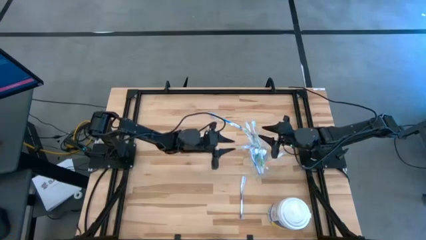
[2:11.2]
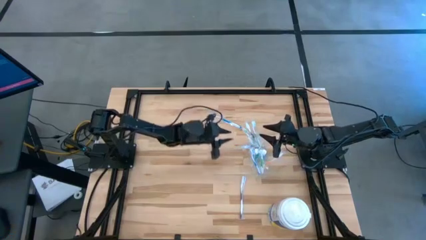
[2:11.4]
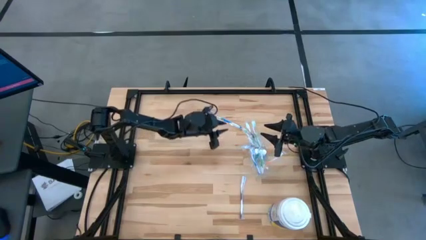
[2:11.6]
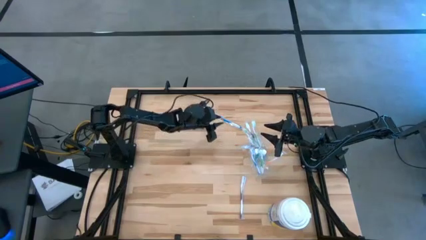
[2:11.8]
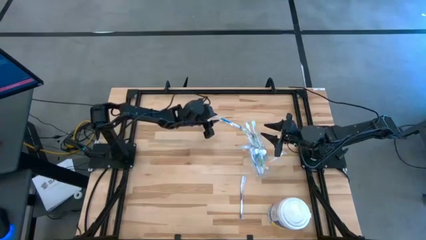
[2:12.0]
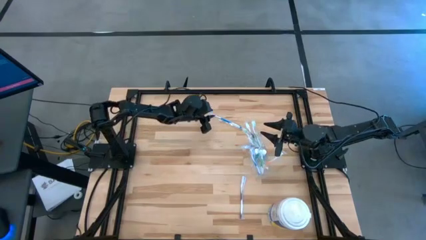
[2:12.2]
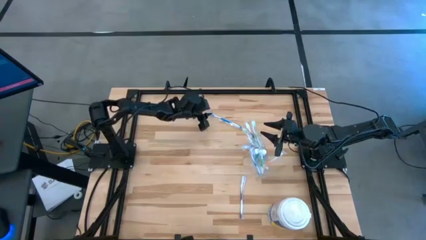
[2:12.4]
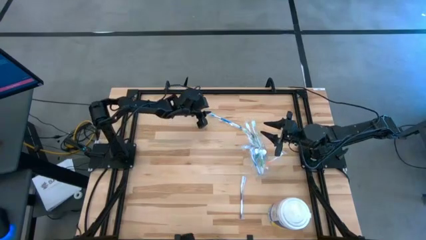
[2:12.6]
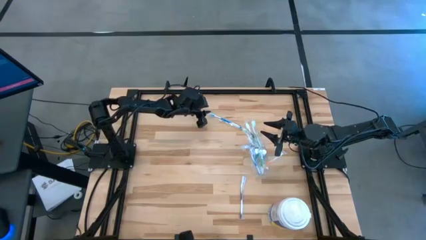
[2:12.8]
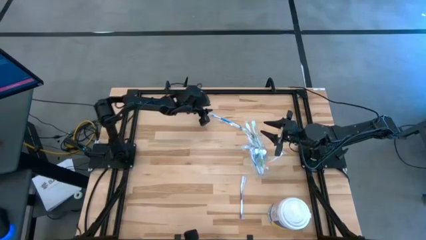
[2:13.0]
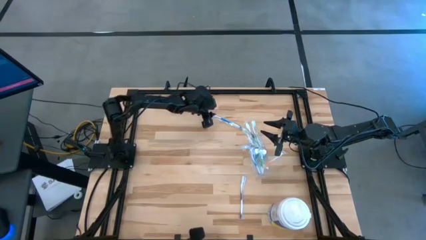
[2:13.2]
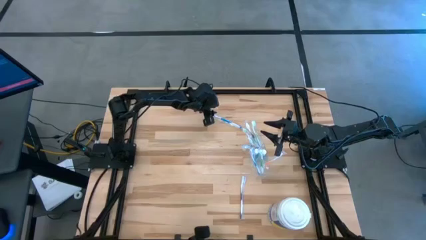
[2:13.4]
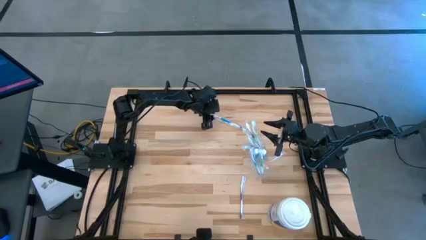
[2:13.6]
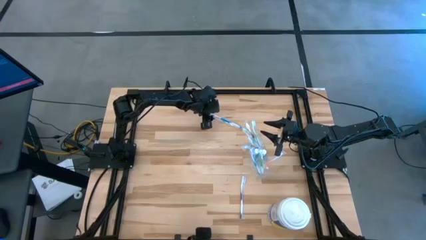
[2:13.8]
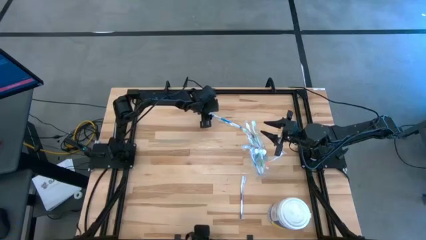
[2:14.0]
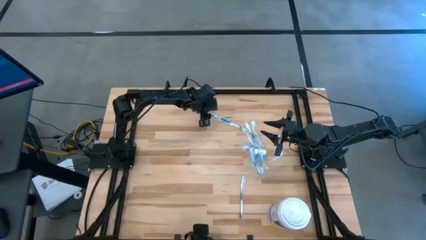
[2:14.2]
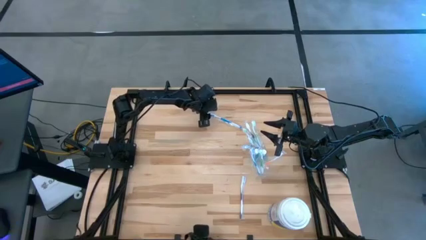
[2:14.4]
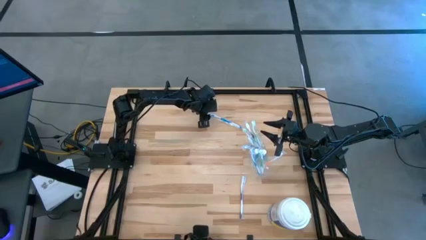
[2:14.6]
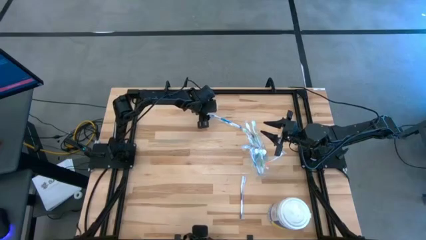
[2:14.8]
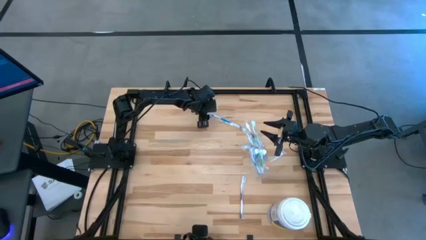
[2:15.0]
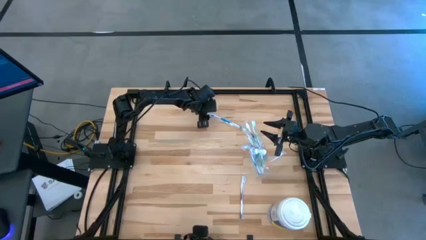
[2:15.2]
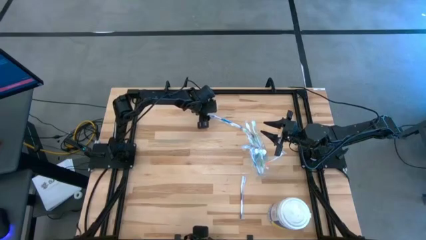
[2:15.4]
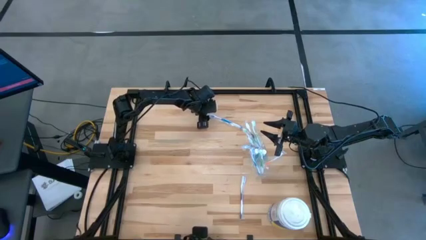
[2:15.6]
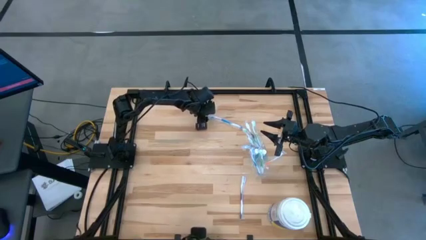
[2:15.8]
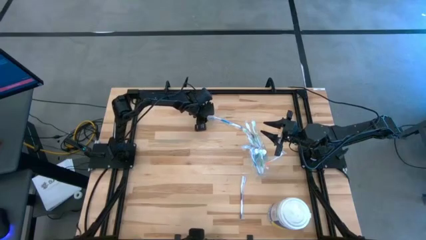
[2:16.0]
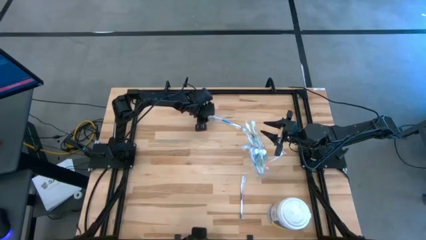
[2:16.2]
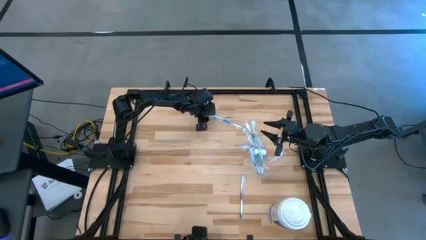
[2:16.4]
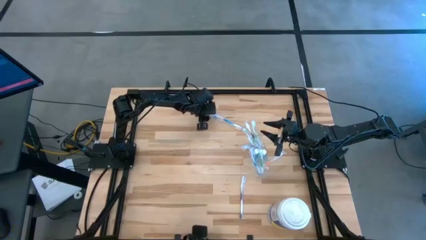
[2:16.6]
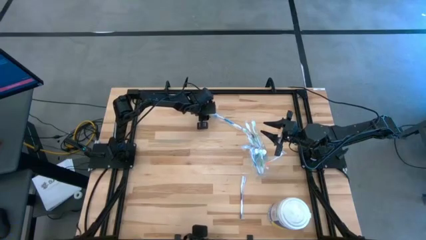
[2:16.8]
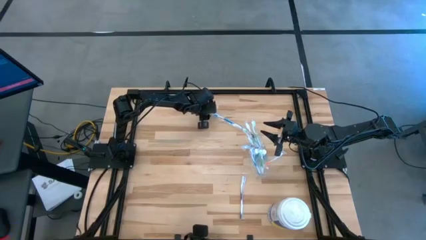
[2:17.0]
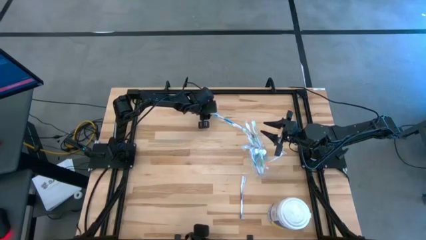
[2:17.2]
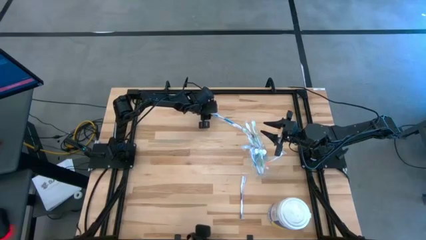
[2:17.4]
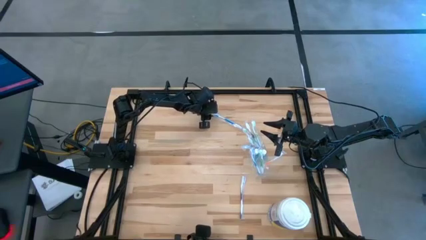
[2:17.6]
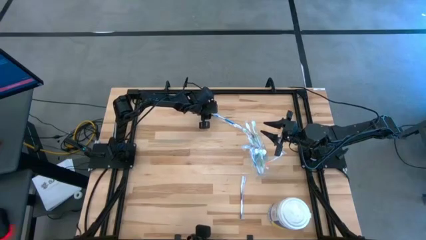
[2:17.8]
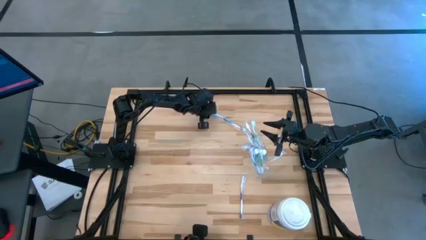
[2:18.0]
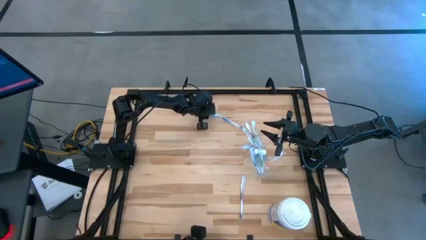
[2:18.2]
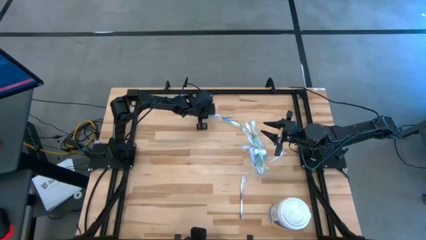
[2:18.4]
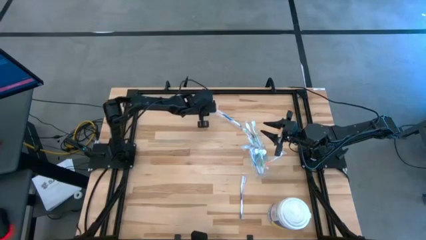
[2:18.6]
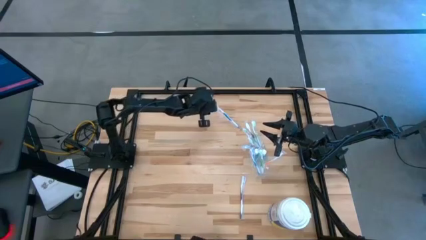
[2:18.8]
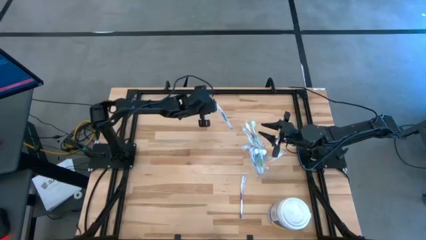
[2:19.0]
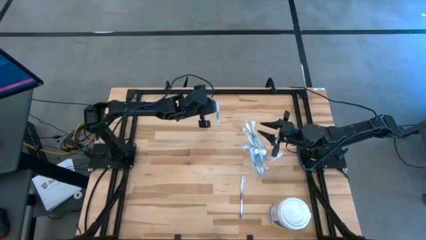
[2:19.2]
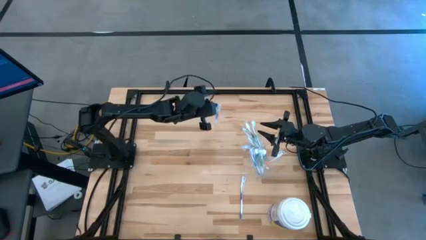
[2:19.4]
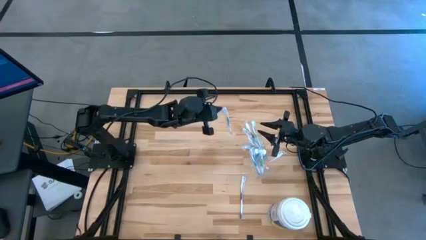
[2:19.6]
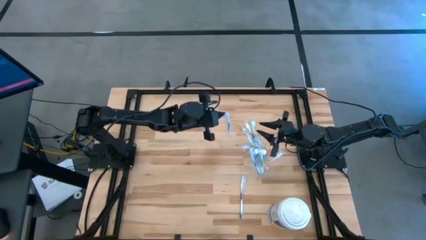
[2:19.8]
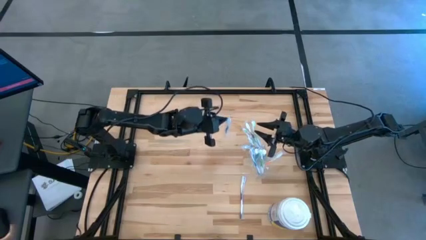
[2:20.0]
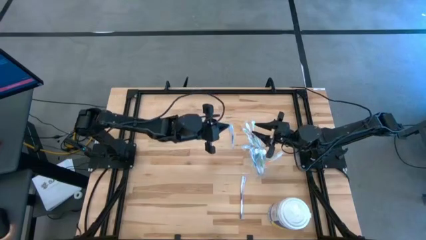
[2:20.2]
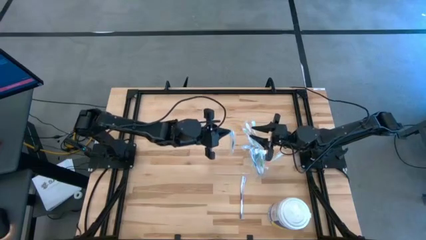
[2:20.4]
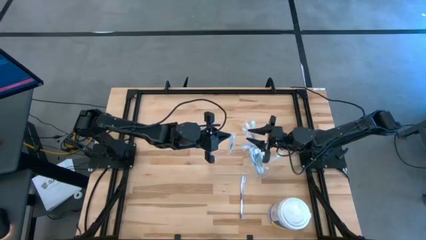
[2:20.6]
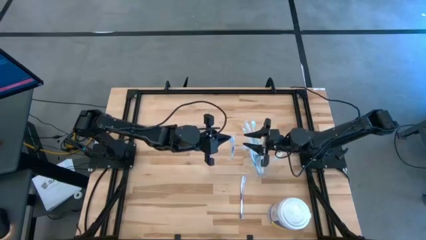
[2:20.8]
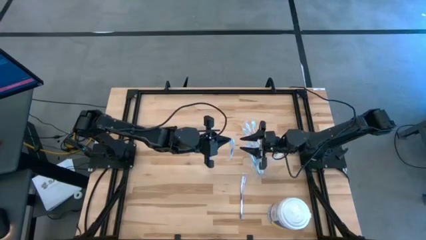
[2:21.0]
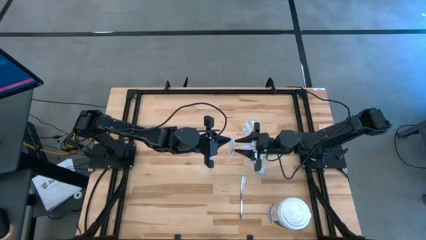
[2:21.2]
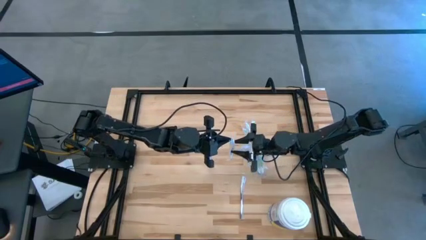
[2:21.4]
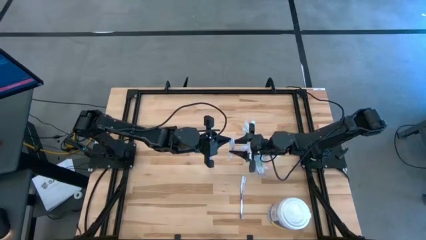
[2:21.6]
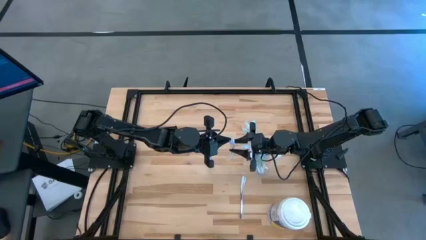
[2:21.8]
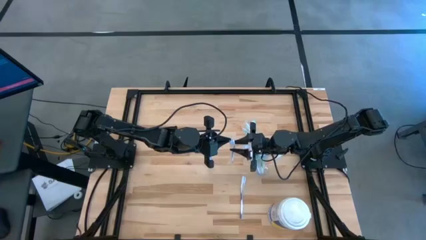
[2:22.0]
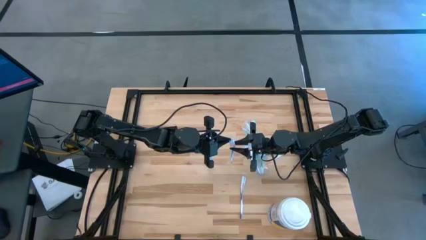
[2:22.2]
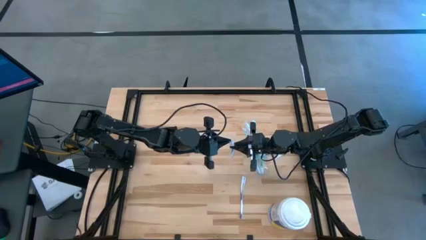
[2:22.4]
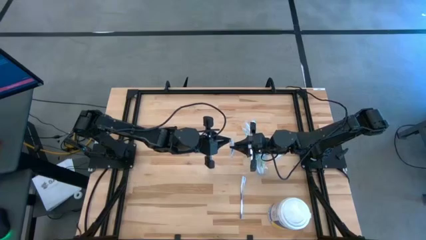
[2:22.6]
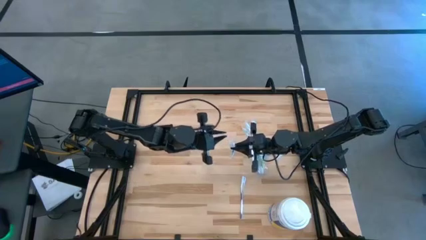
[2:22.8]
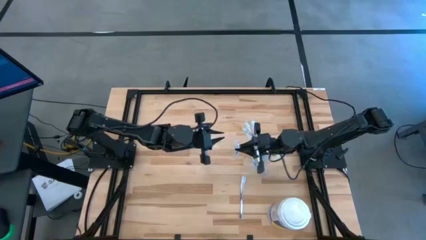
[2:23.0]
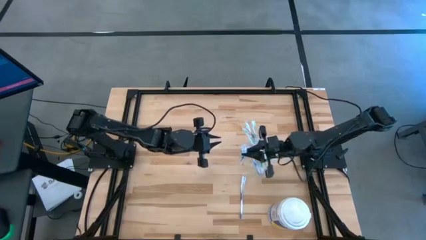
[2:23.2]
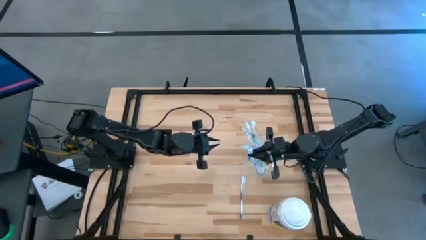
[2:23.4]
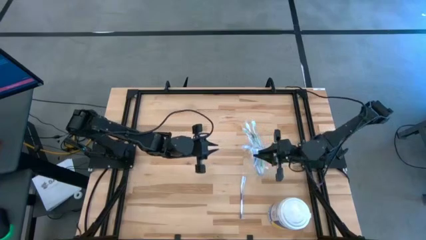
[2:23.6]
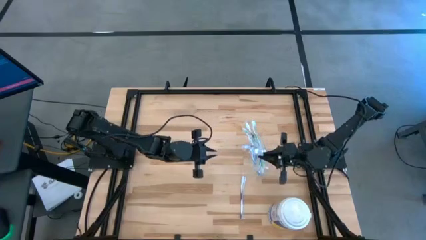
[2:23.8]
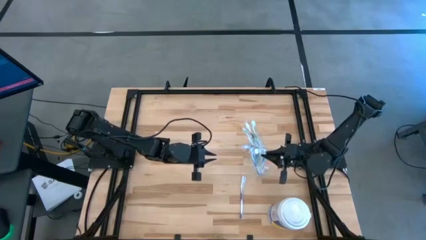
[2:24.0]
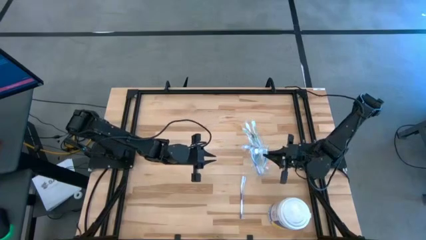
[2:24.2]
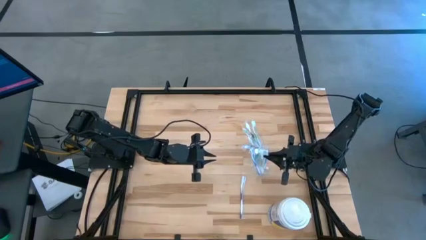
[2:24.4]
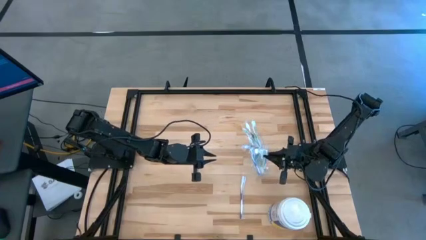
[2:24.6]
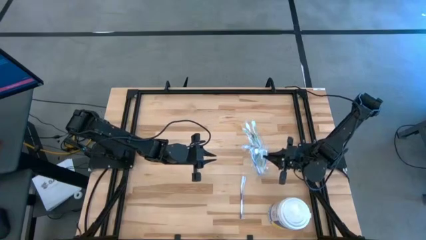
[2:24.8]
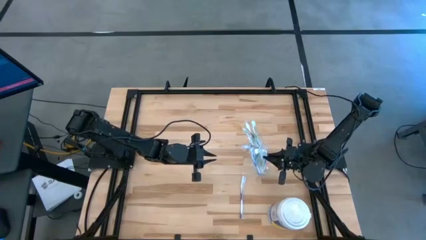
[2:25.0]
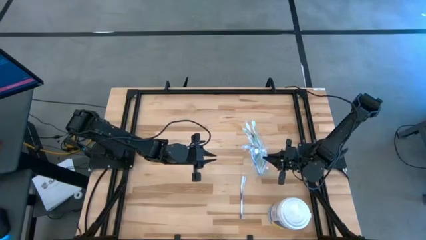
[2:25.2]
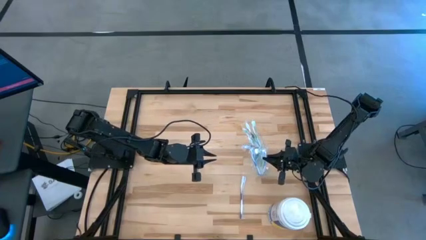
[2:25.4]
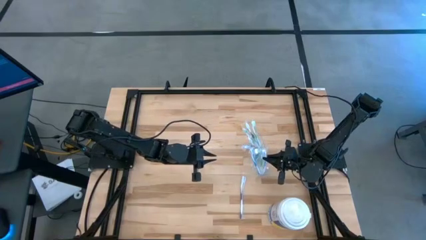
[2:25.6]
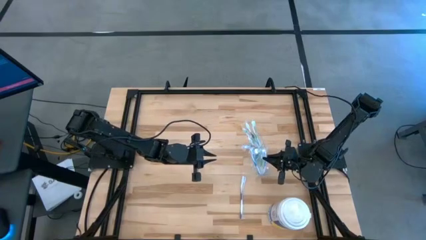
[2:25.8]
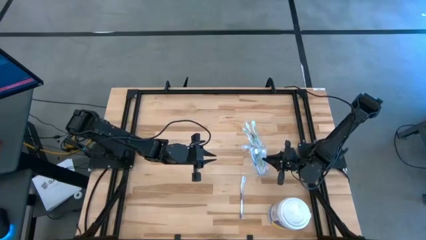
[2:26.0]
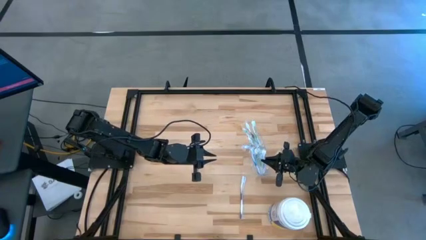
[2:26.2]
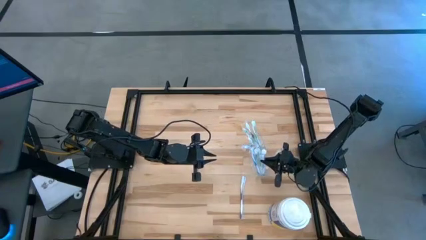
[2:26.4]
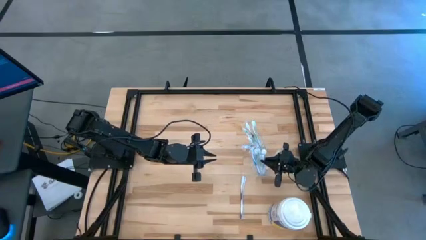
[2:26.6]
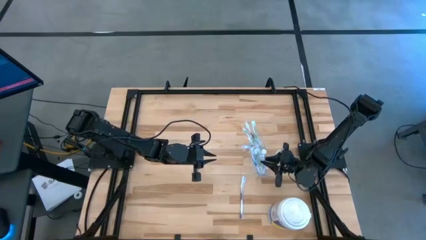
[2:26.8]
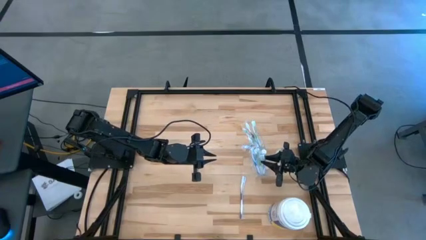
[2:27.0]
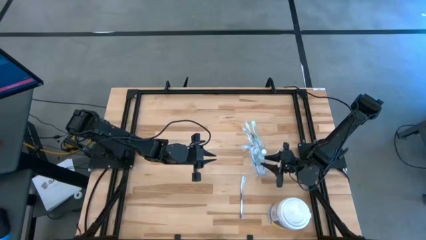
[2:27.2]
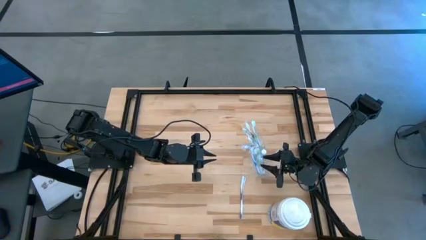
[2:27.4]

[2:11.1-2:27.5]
Task: Pick & Place toothbrushing station
Put the blue toothbrush into the transparent organizer
